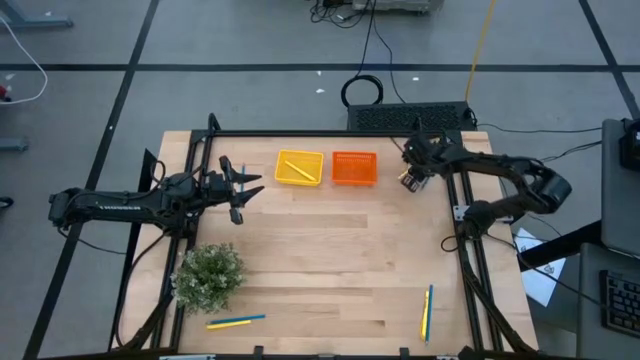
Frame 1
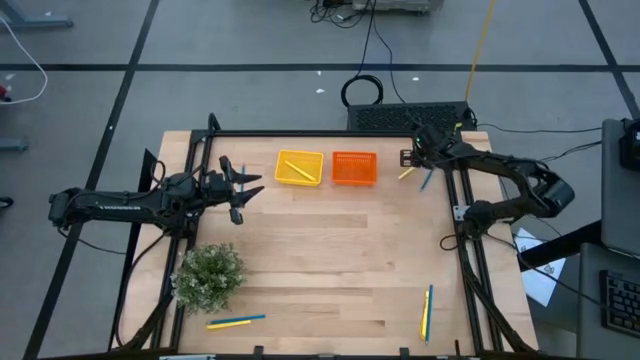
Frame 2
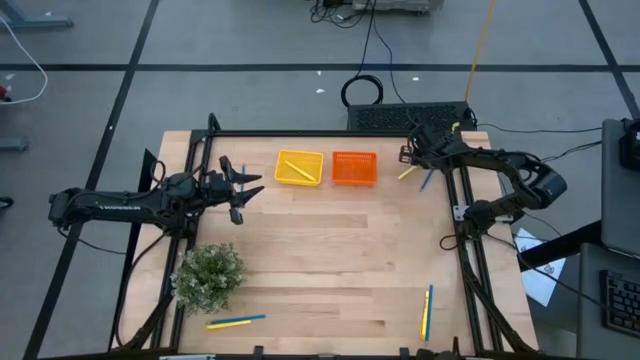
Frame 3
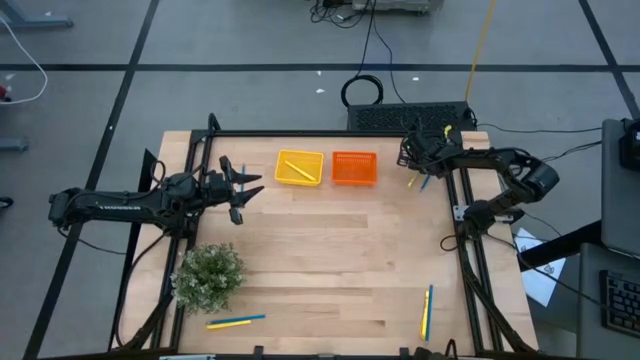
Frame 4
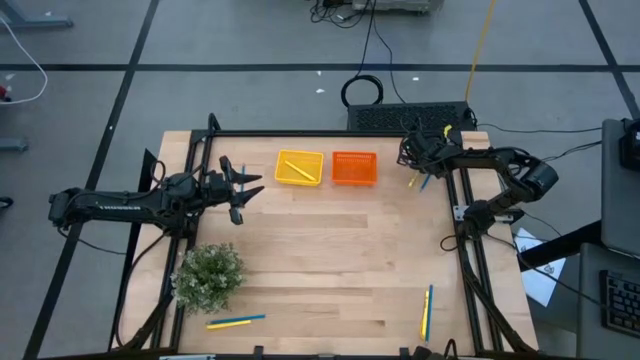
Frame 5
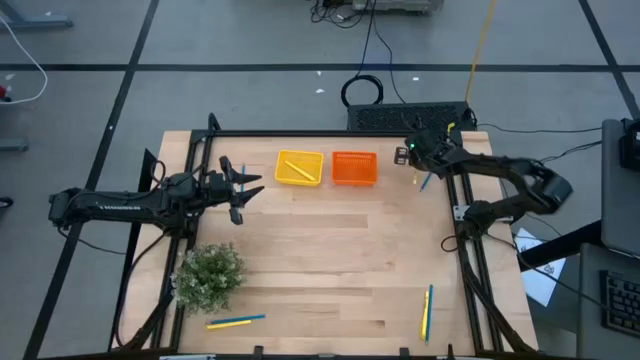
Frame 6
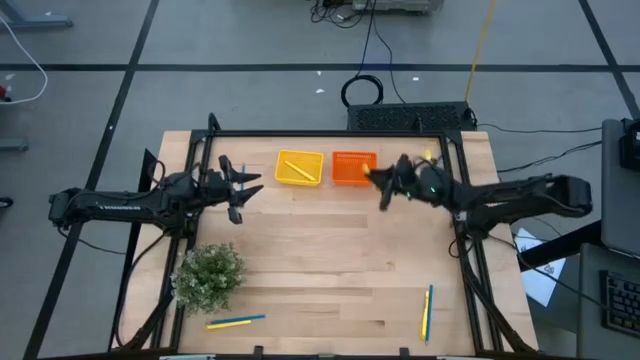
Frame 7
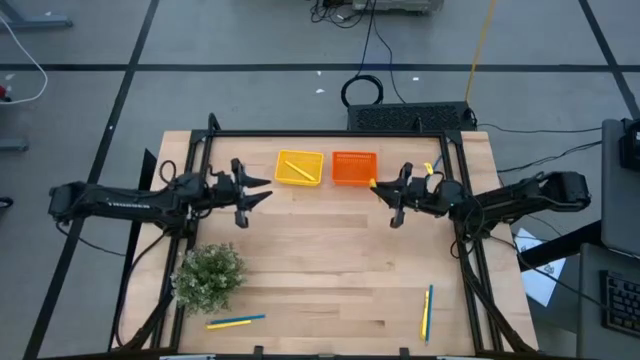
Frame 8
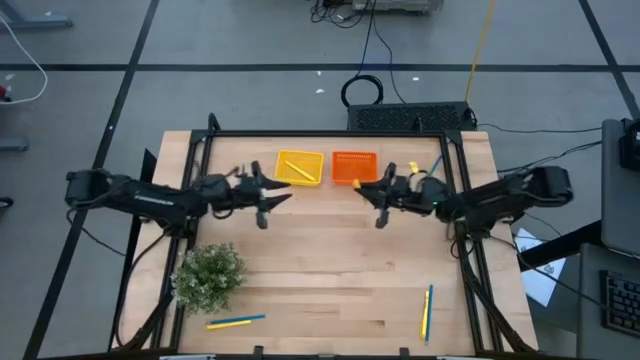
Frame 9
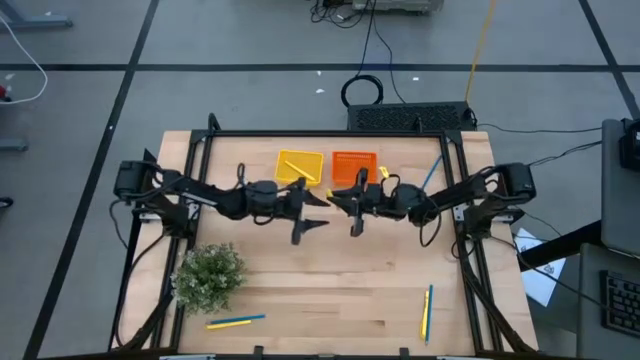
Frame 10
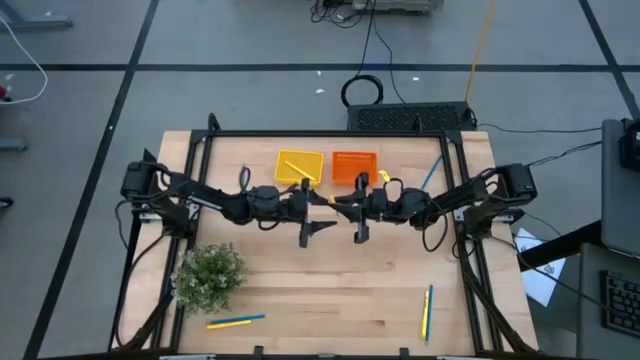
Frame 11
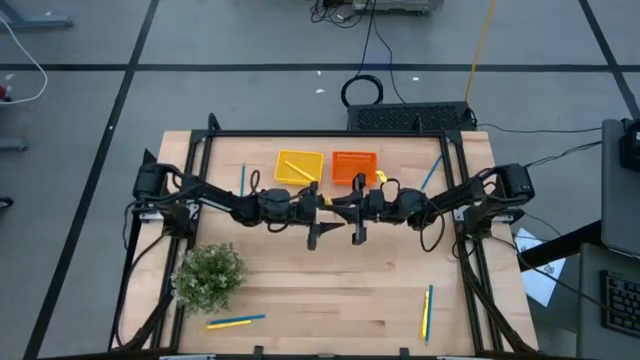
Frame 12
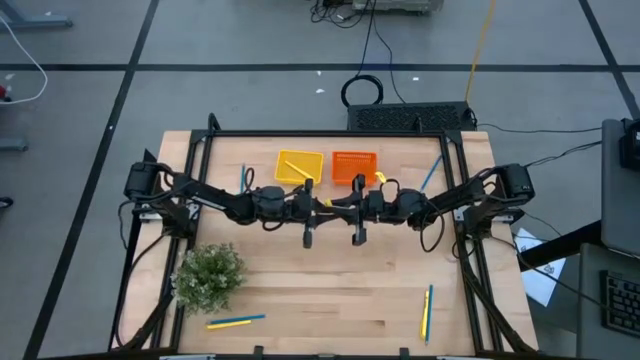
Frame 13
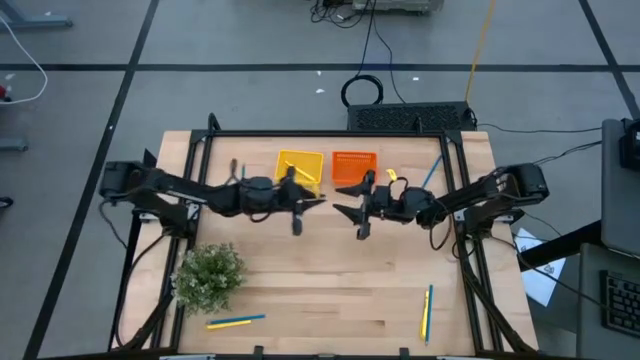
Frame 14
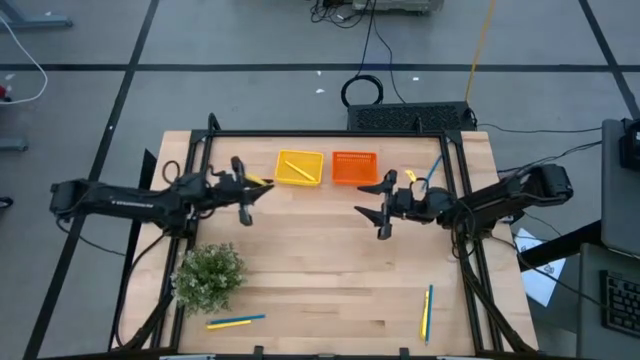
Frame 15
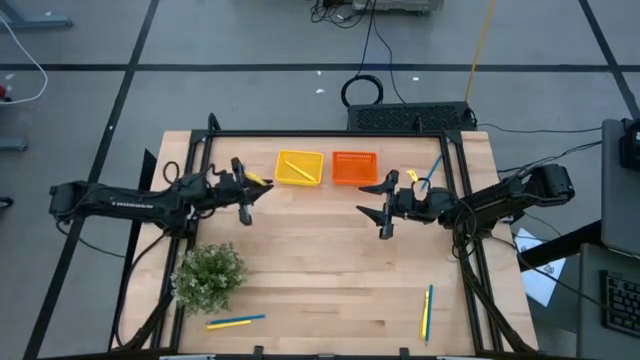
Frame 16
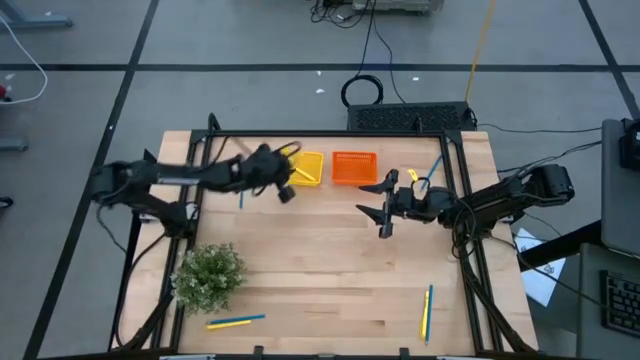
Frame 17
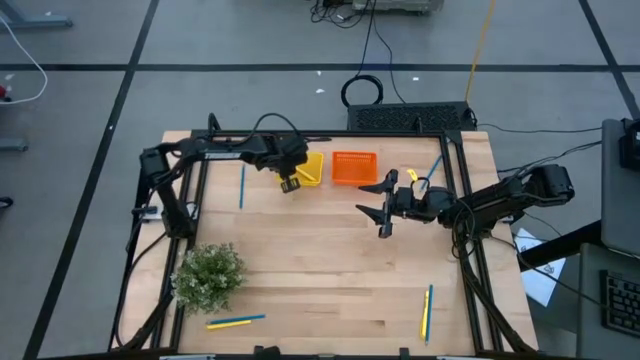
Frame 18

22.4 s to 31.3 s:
Task: Sort pens & pencils
Put the top right yellow pen into the yellow bin

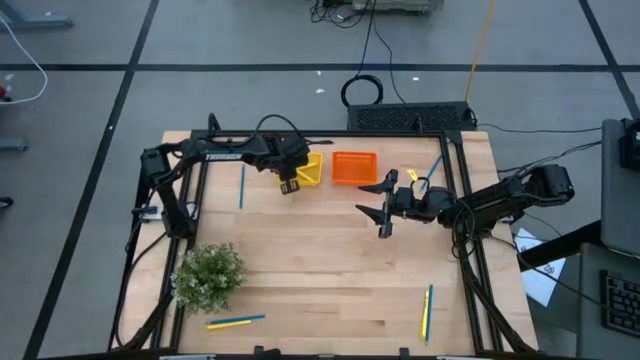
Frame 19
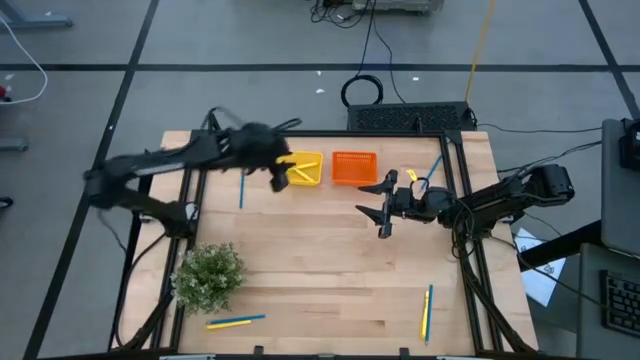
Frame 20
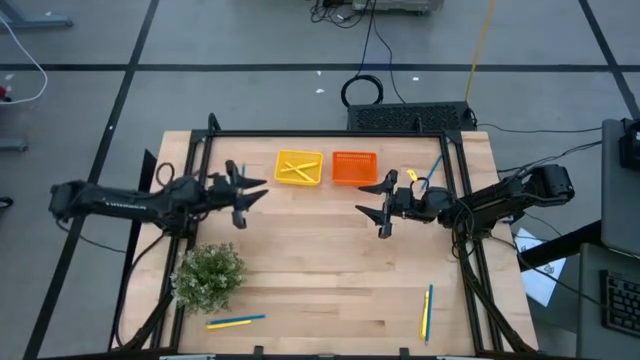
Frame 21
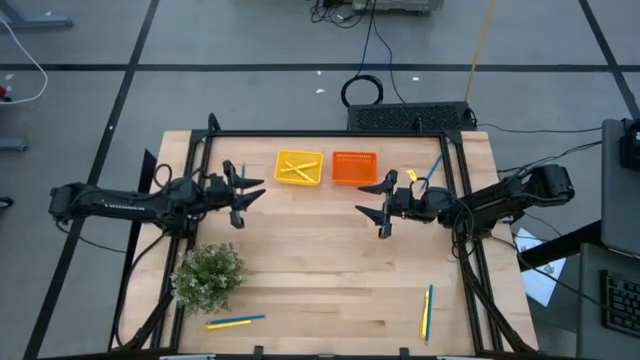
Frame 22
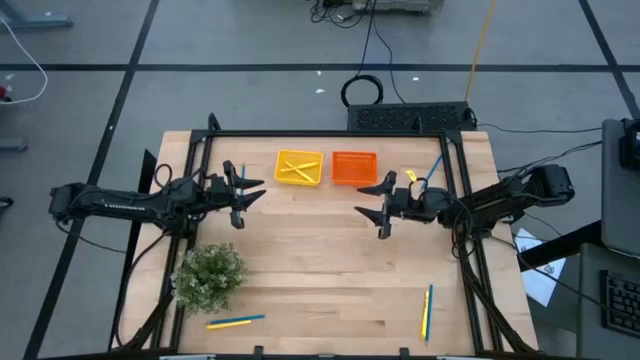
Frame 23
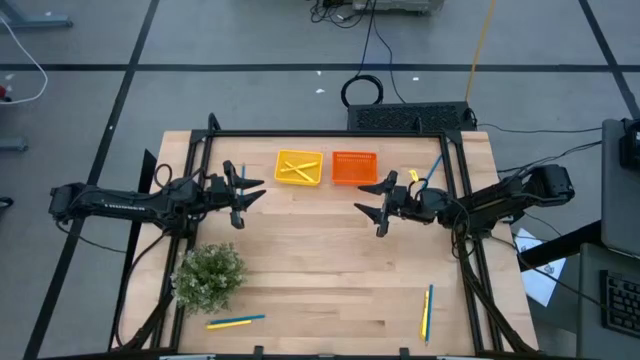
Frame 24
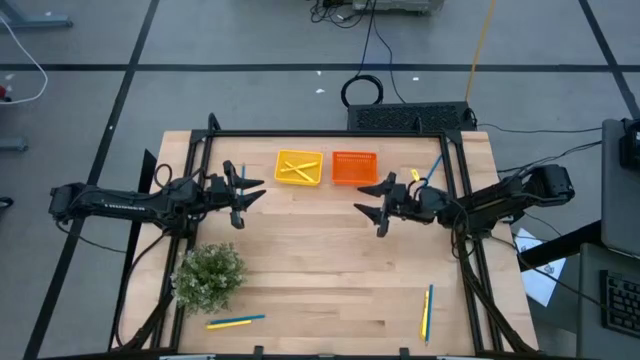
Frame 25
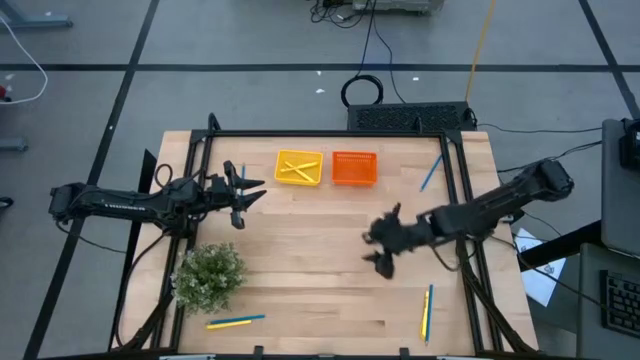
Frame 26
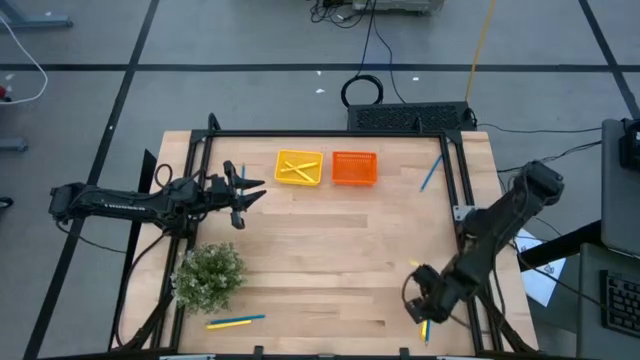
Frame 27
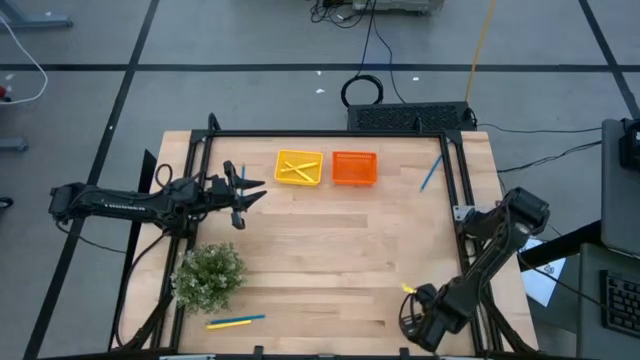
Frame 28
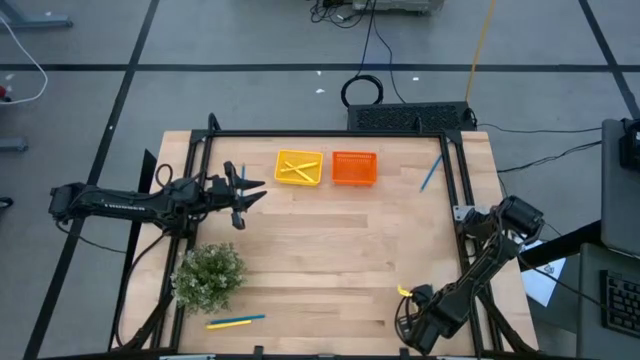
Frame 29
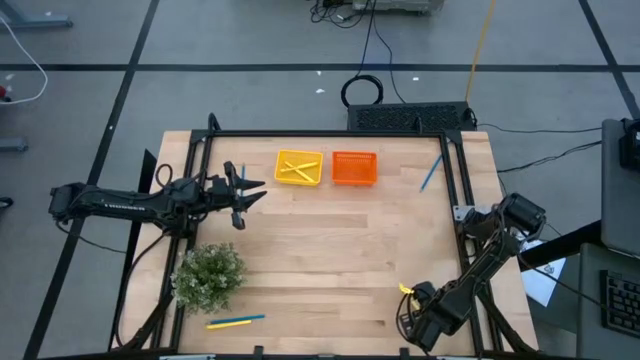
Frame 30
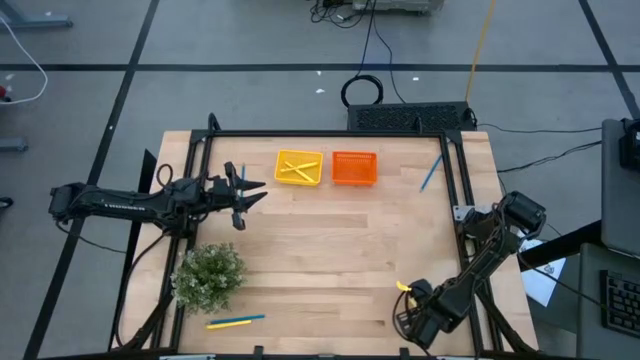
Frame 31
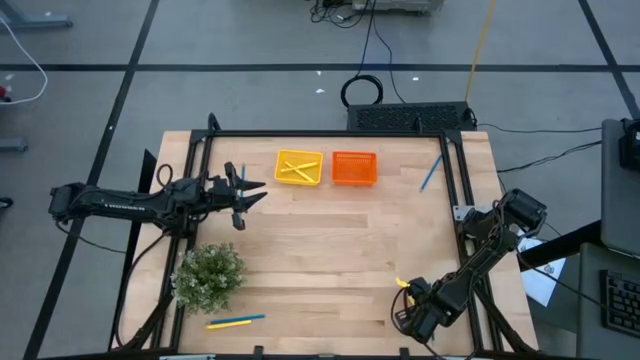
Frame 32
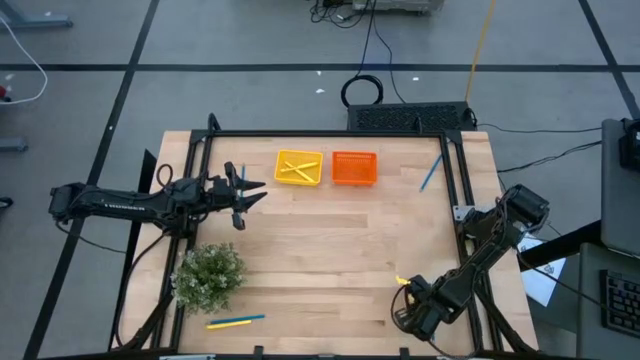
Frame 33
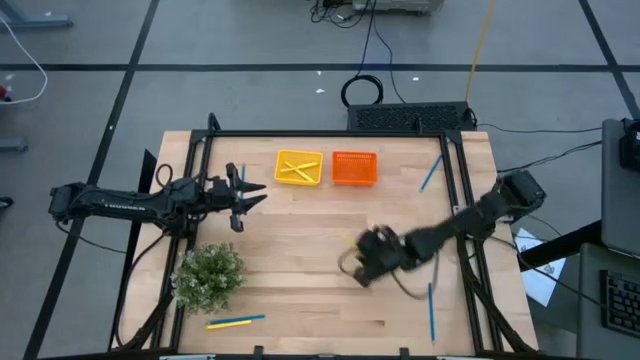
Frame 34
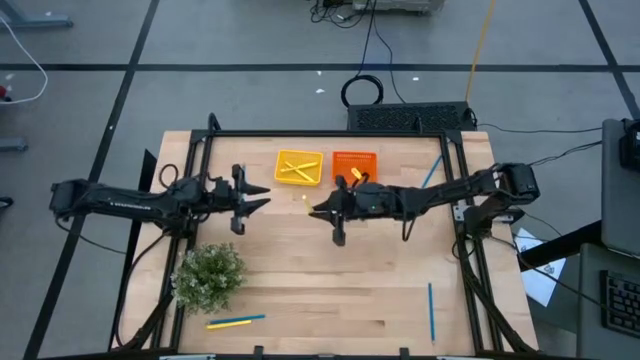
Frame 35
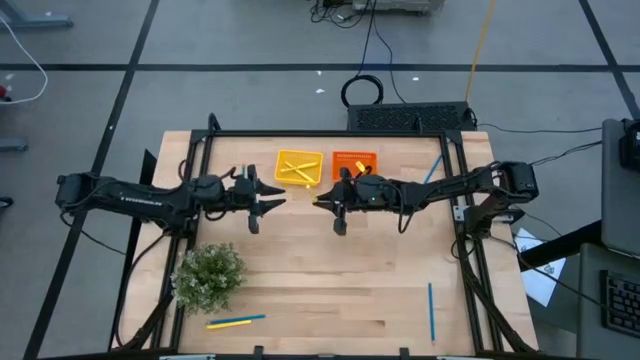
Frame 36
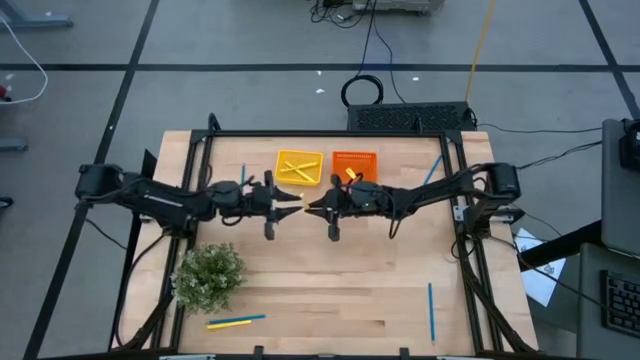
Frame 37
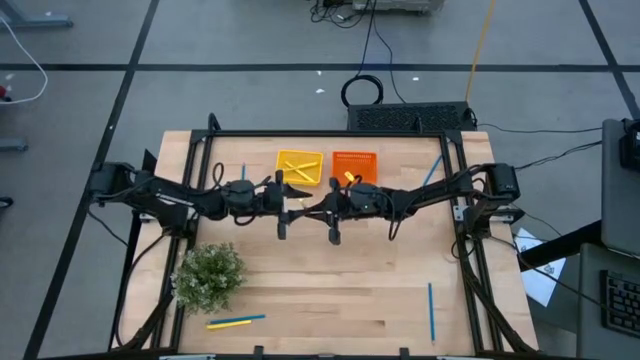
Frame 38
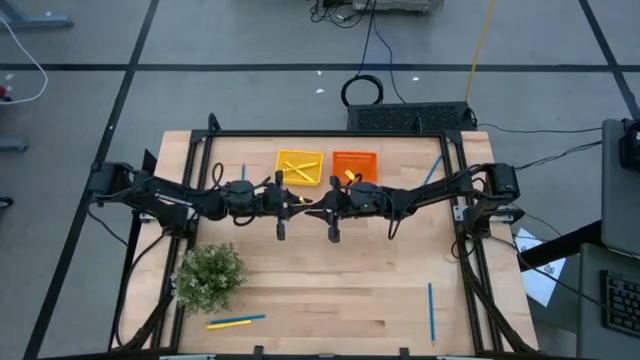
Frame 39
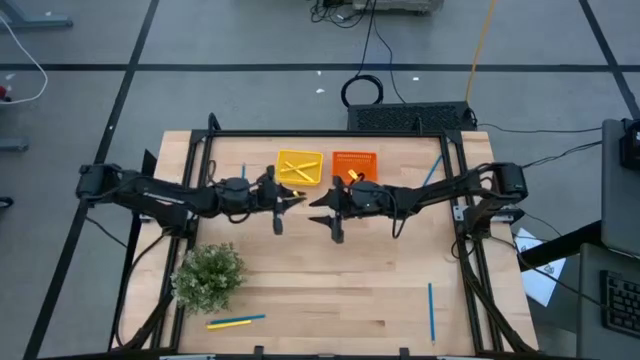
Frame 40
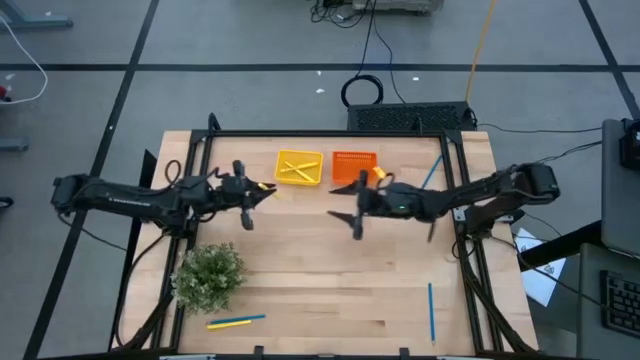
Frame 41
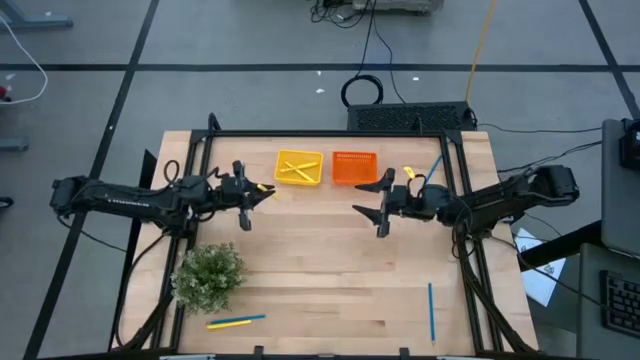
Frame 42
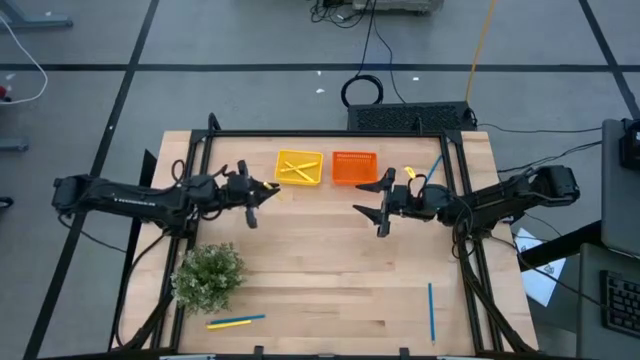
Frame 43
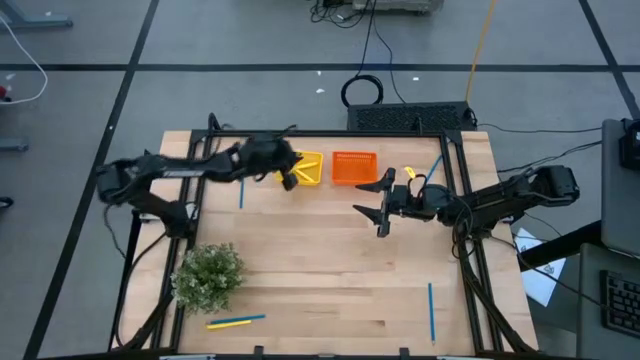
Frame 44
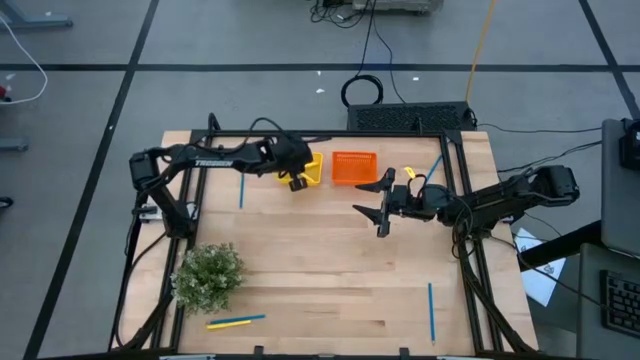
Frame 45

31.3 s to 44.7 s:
Put the right yellow pen into the yellow bin
